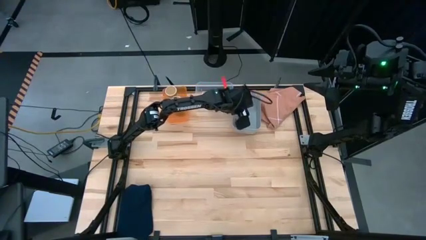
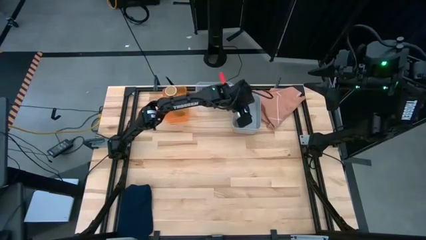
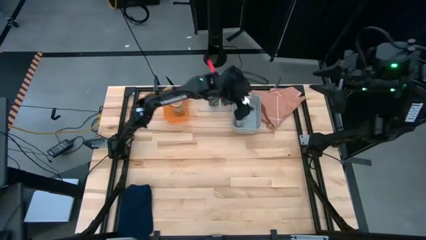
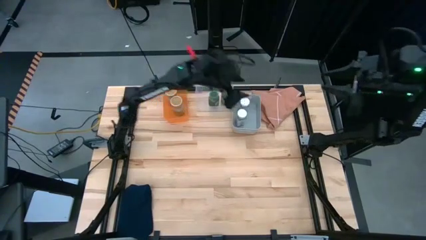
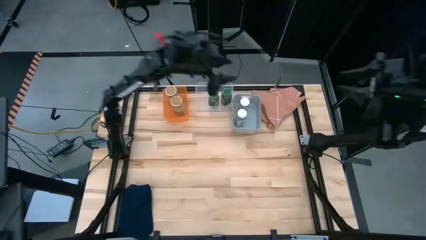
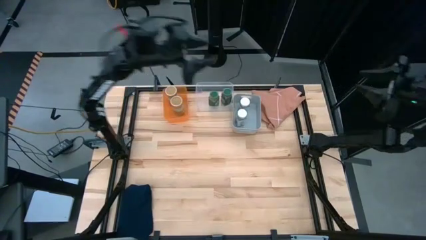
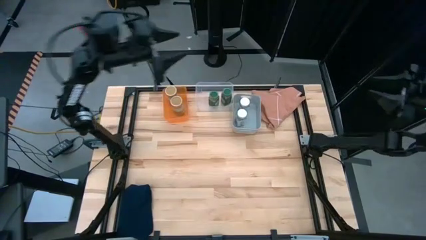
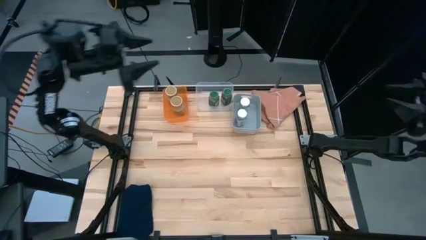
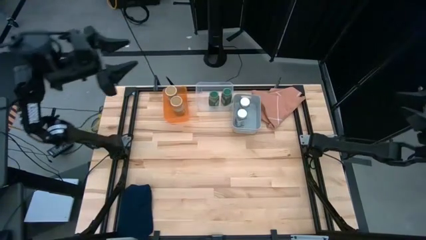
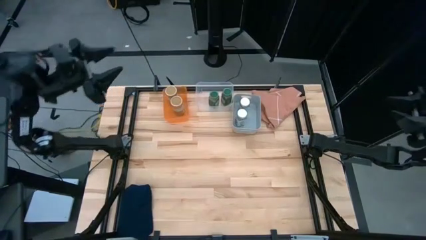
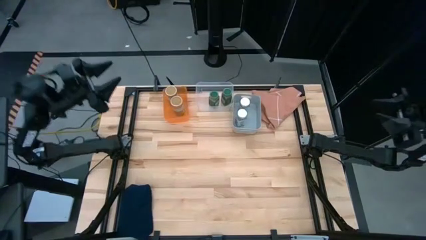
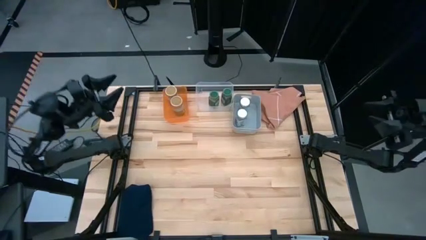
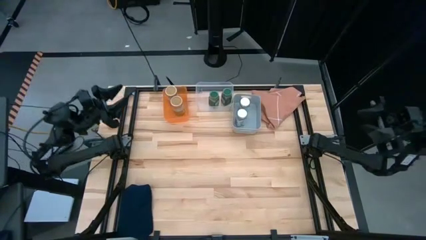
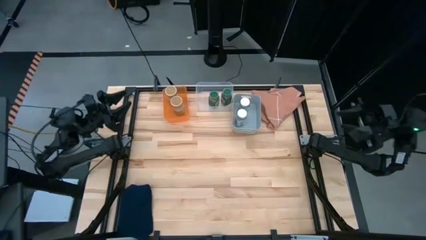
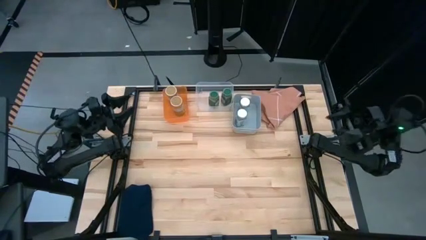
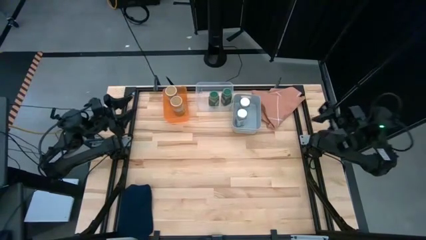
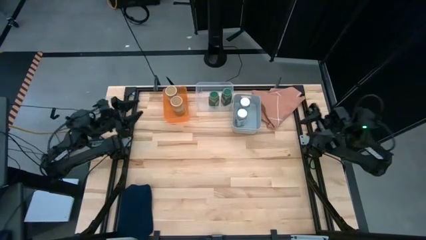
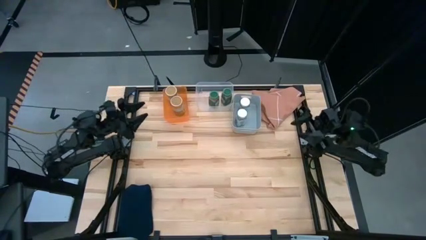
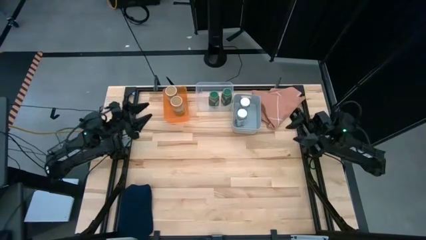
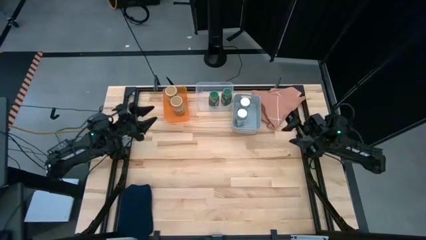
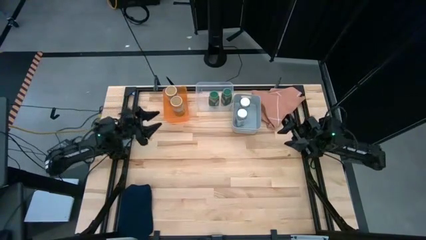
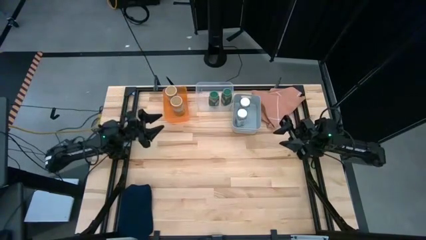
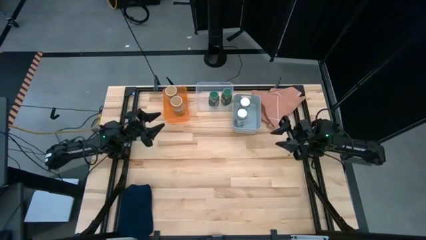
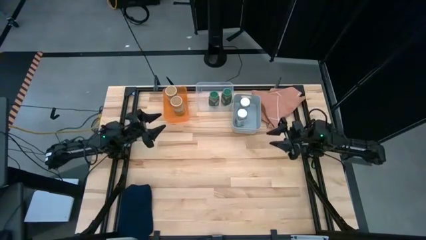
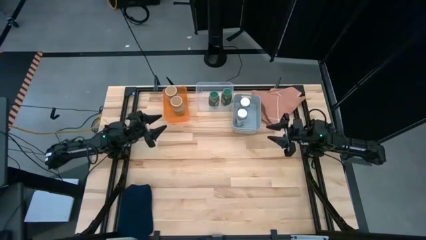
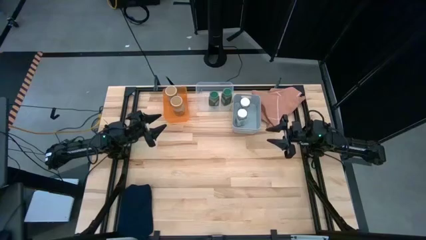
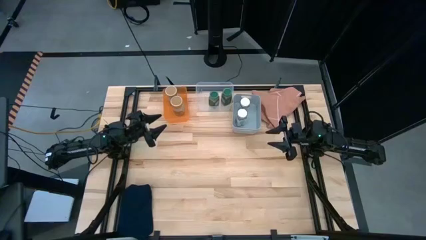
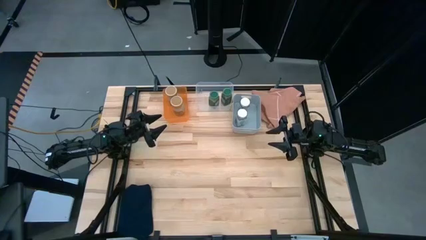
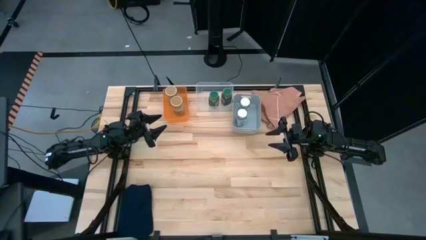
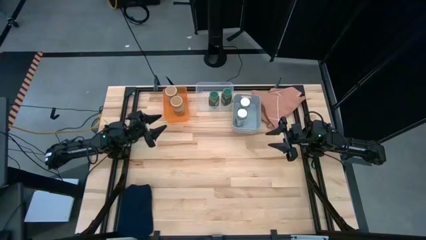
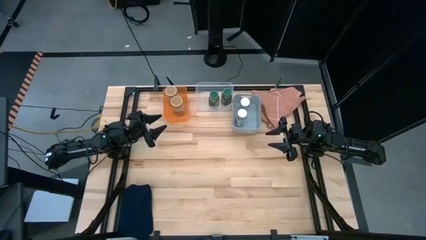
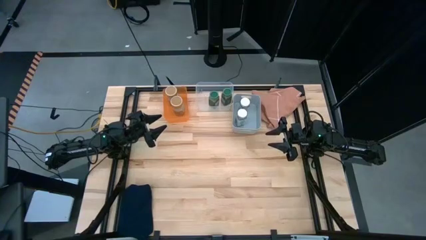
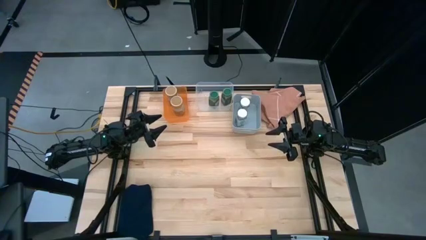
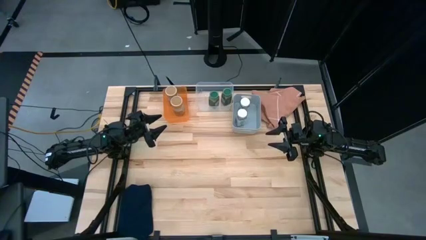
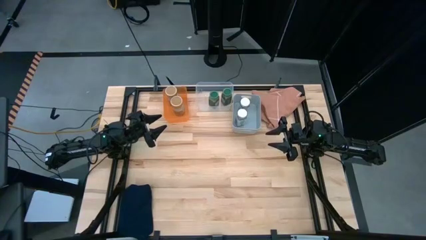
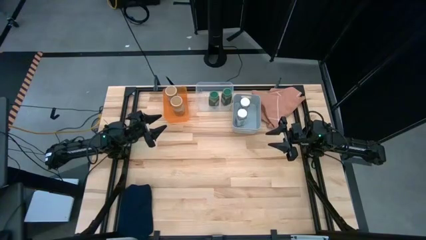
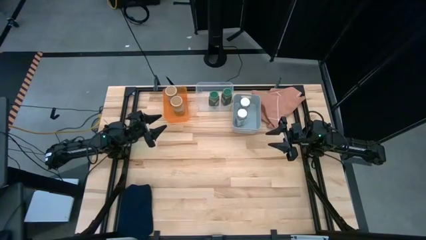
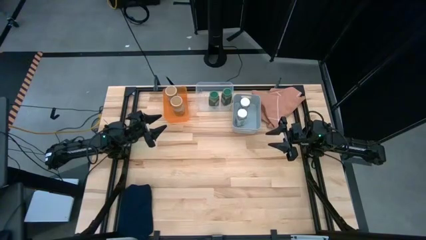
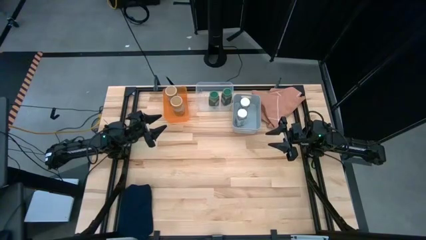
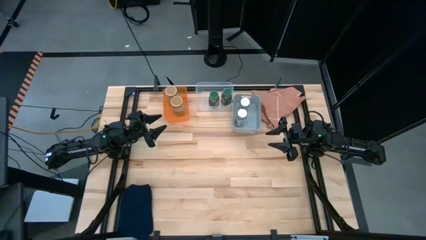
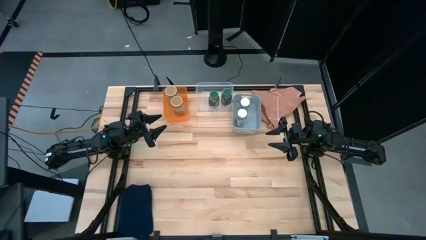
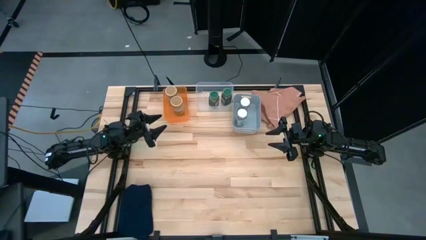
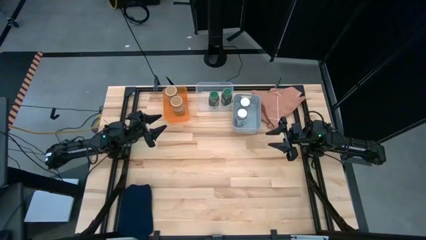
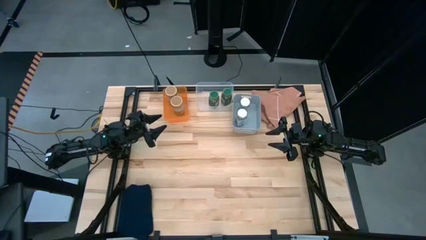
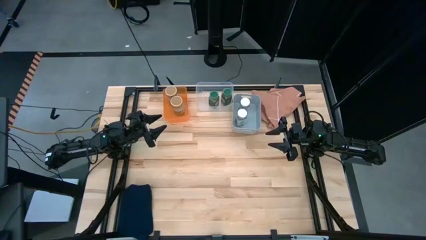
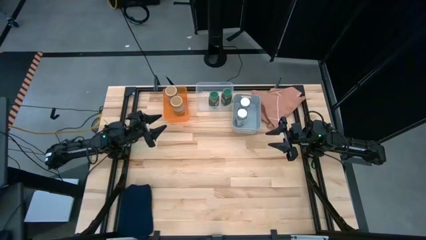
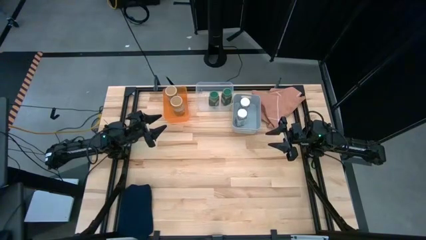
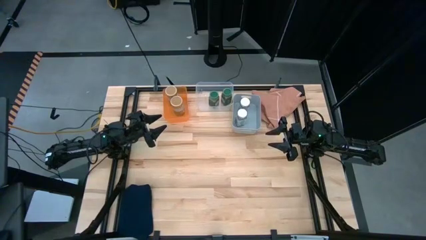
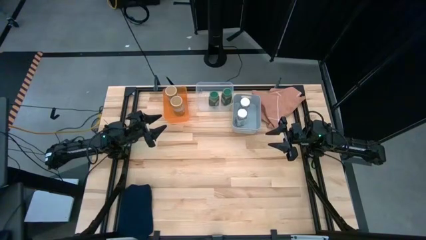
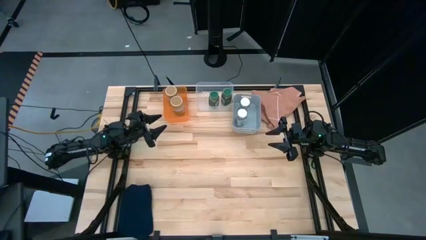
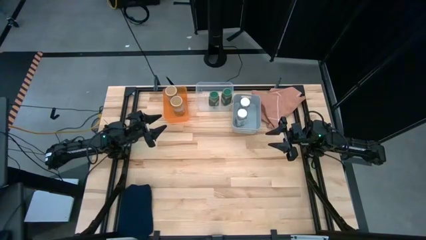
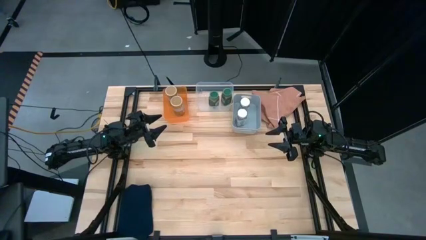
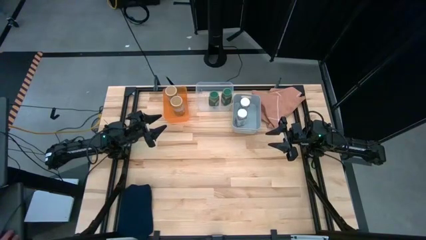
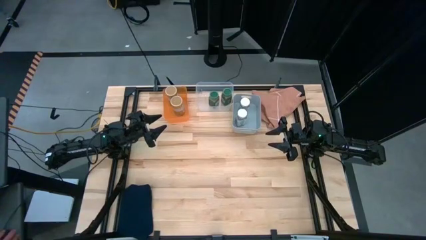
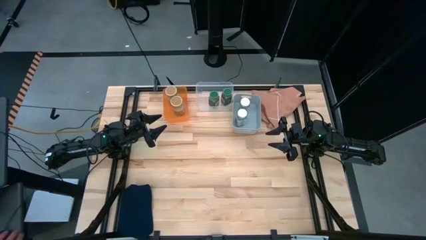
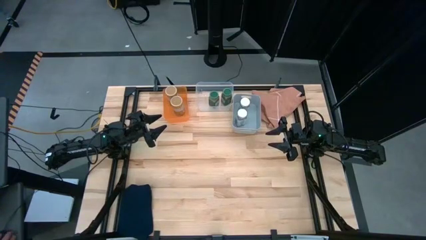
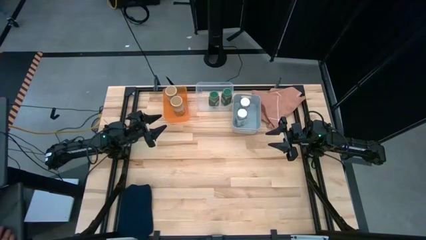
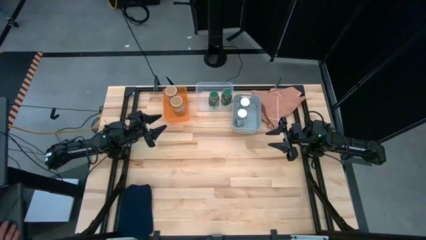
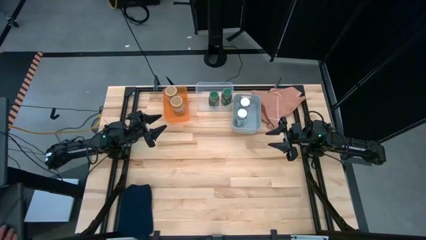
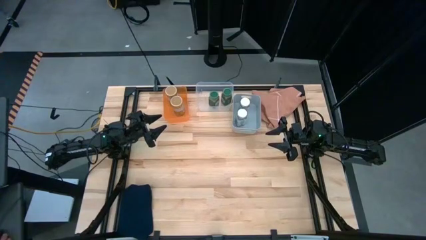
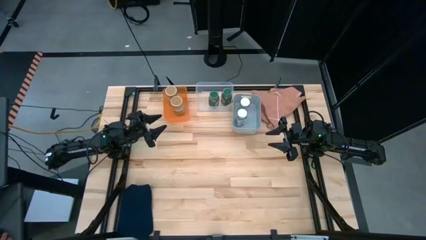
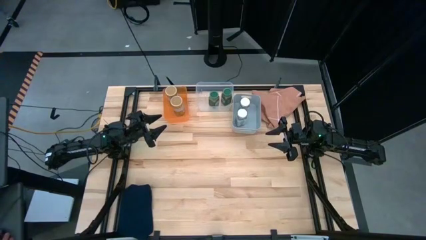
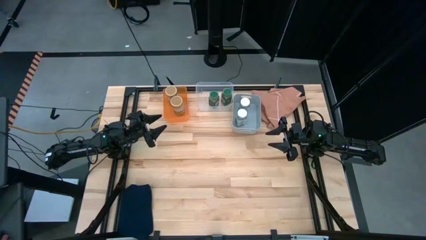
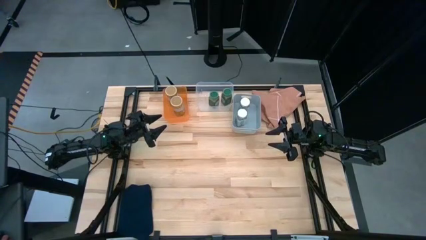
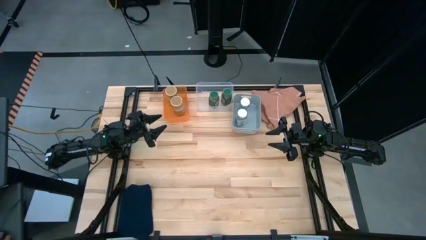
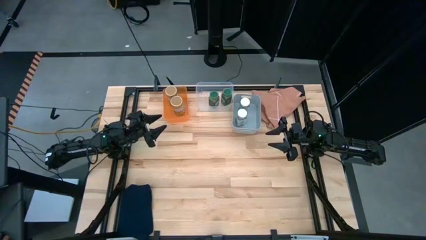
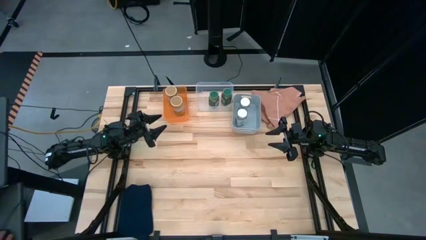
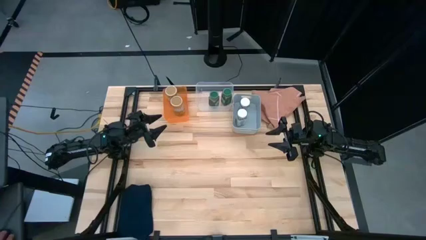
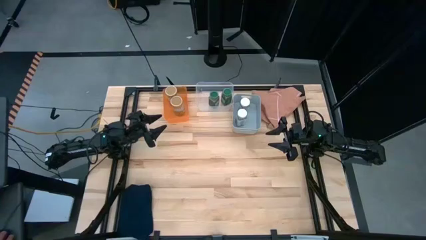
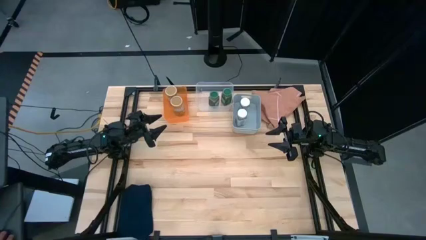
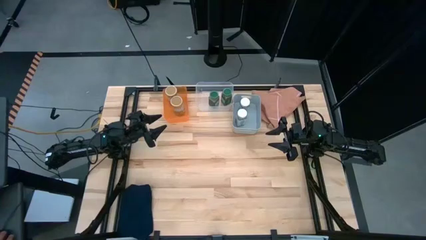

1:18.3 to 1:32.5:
Task: Sort spices by type
Return to Home Position
